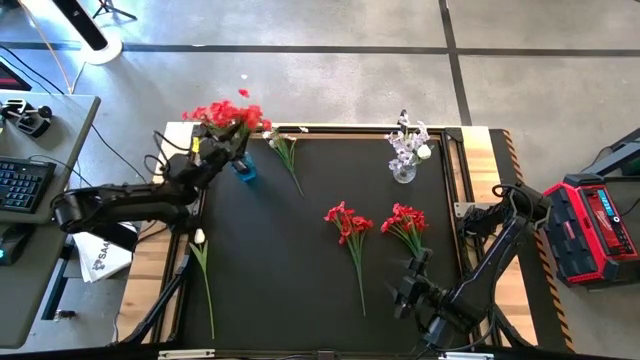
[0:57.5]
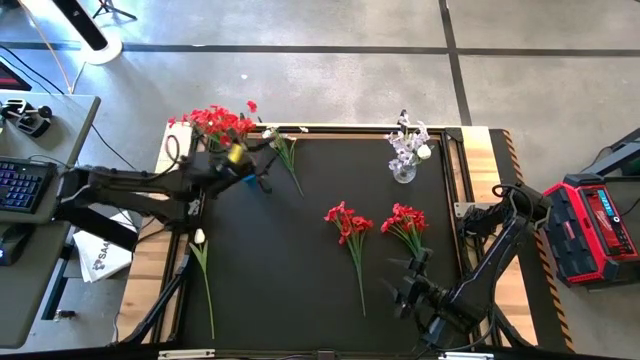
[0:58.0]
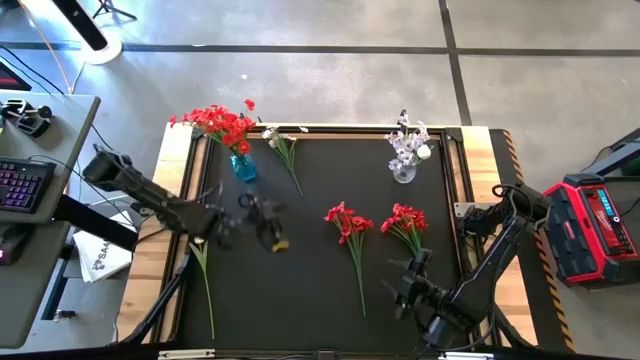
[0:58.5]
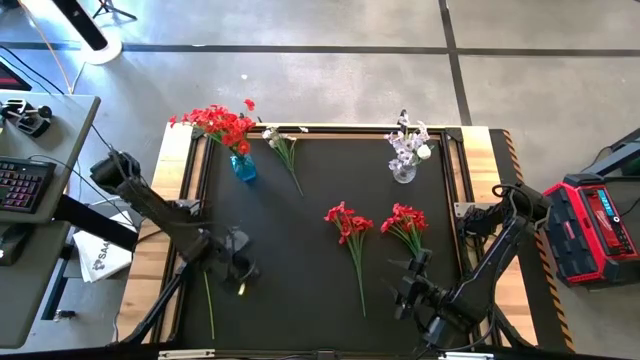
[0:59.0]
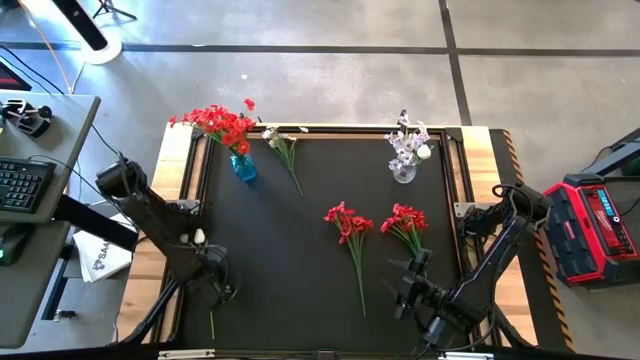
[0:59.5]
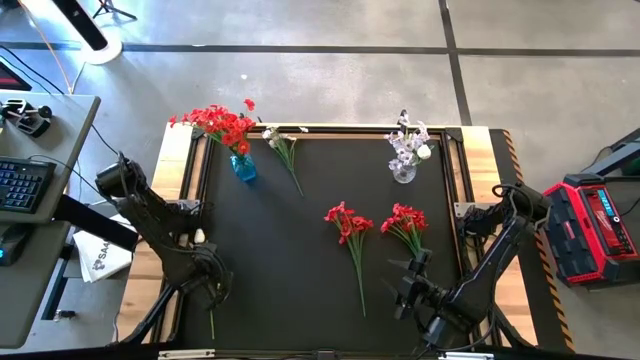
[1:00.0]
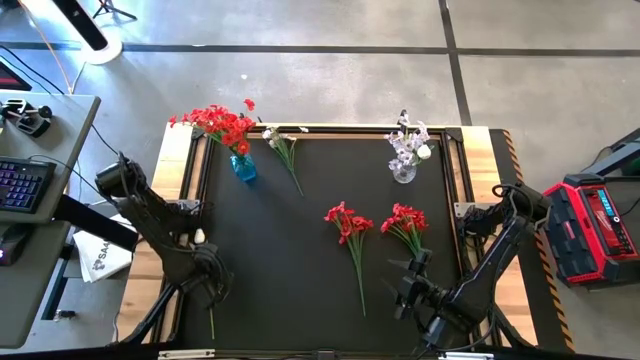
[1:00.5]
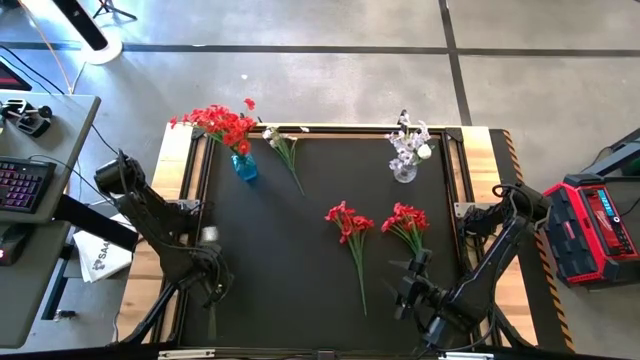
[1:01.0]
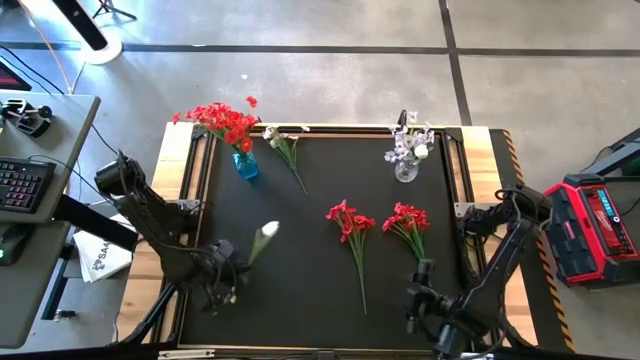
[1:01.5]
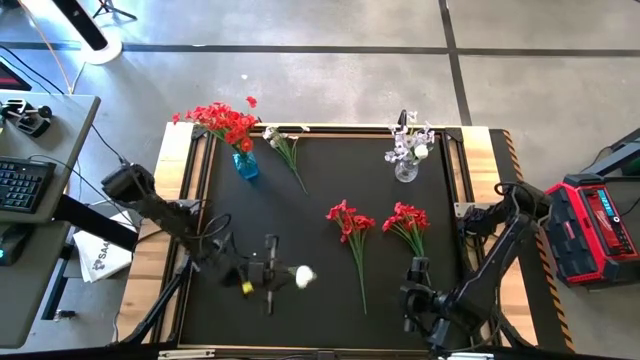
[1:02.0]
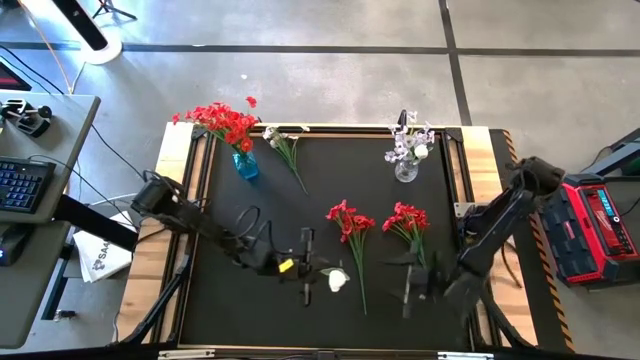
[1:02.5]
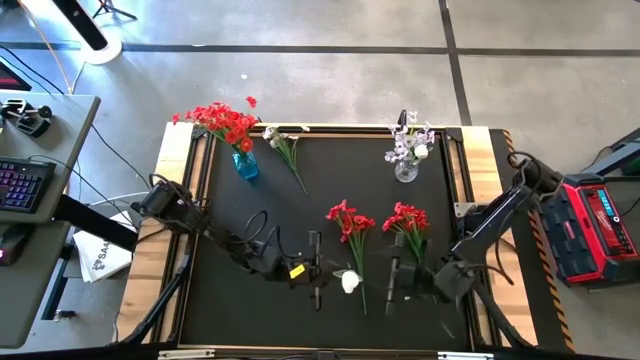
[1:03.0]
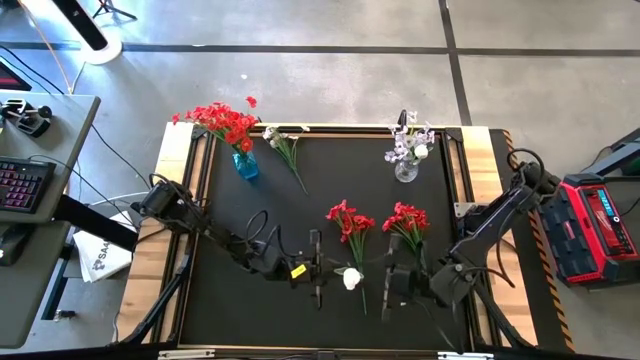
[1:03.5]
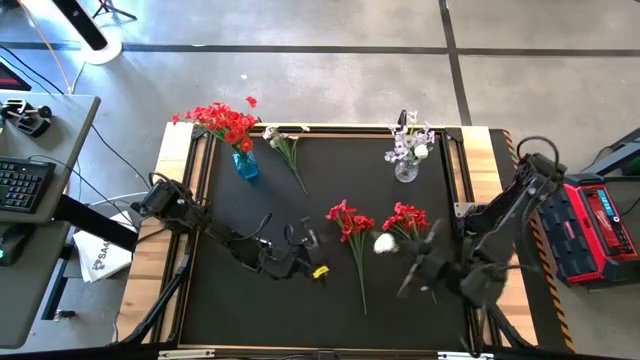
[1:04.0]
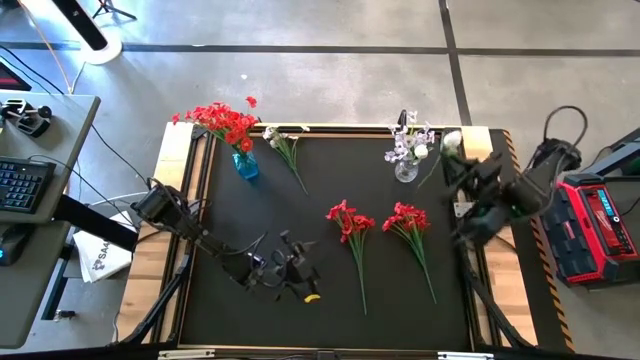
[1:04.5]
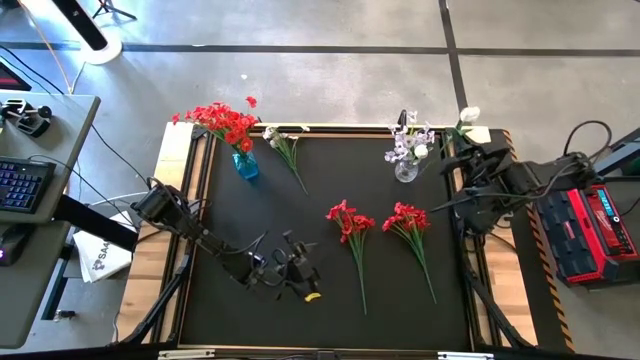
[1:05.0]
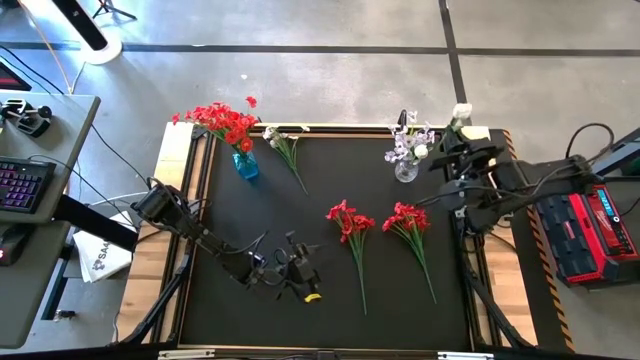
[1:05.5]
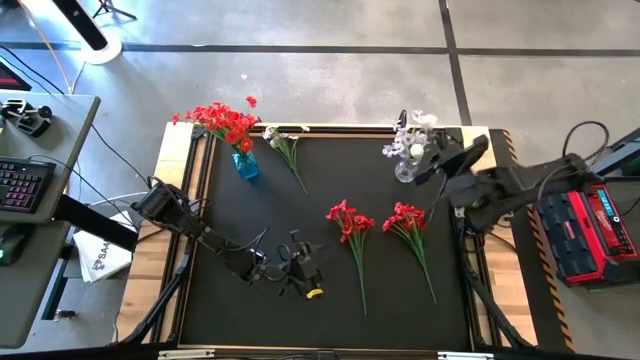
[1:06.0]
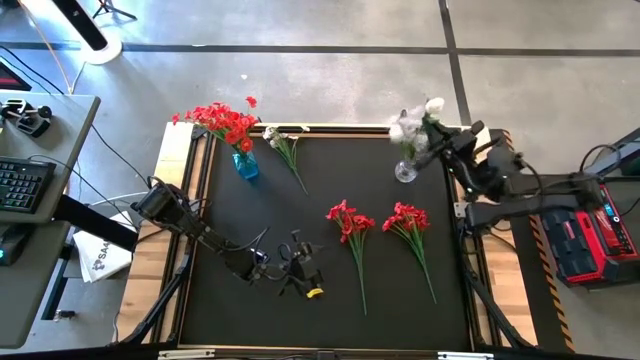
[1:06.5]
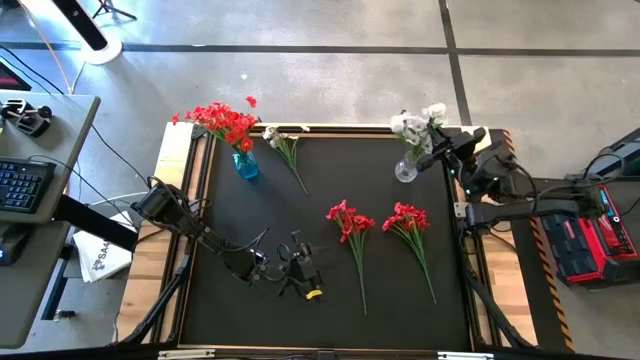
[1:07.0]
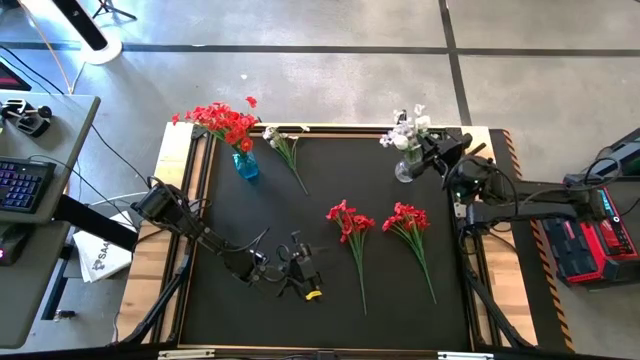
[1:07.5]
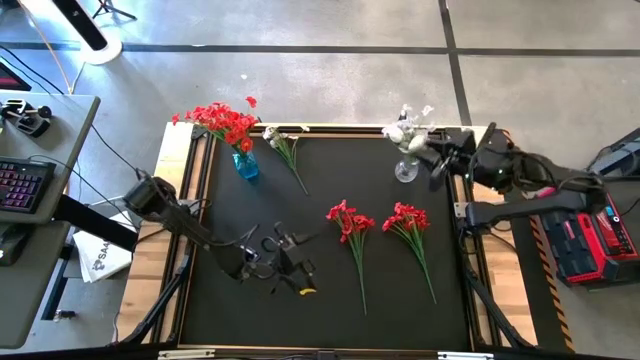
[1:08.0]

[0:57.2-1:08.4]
Task: Sort flowers into vase by color
Put the white flower into the transparent vase

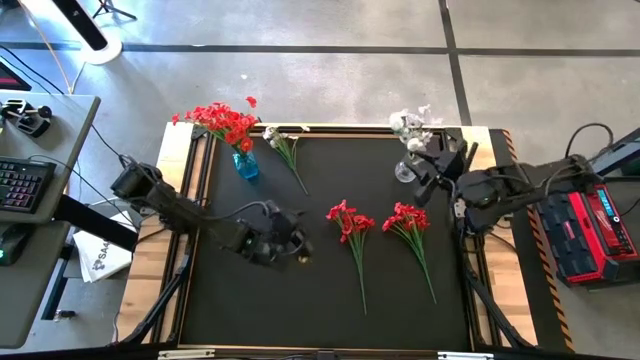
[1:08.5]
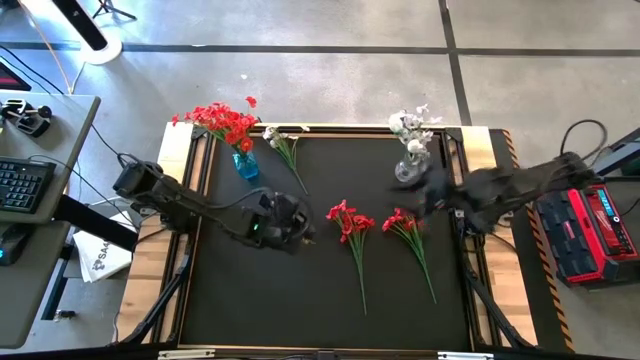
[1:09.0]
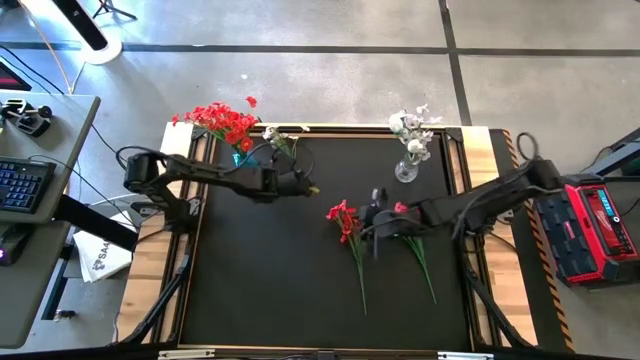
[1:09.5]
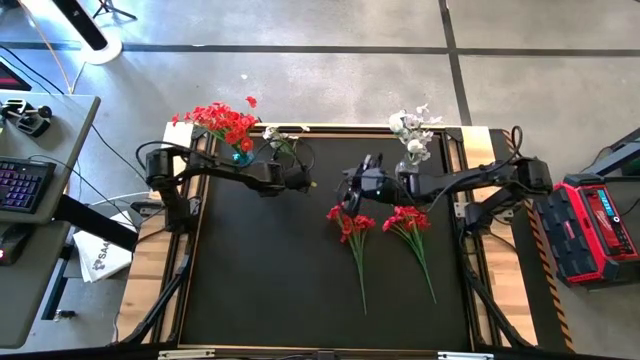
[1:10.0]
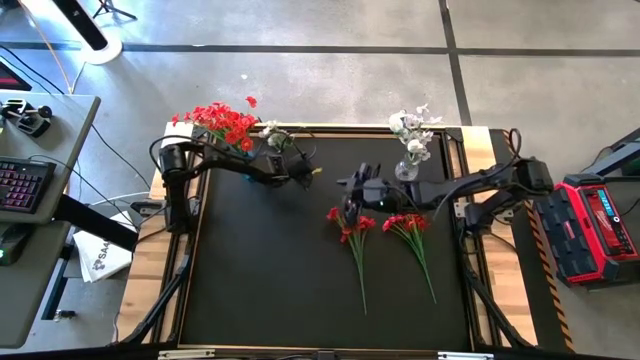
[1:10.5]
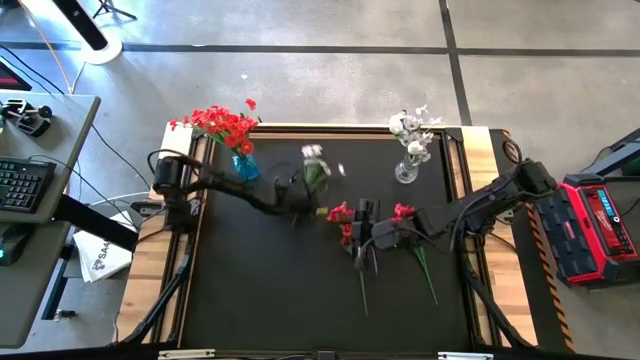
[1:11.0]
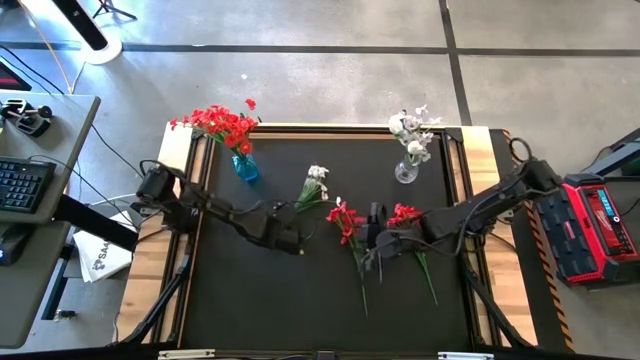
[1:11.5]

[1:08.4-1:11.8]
Move the white flowers to the center of the table

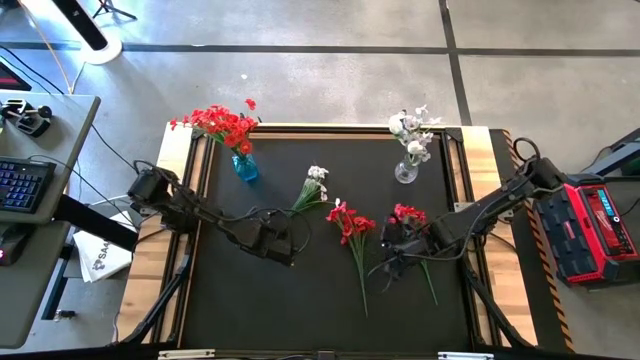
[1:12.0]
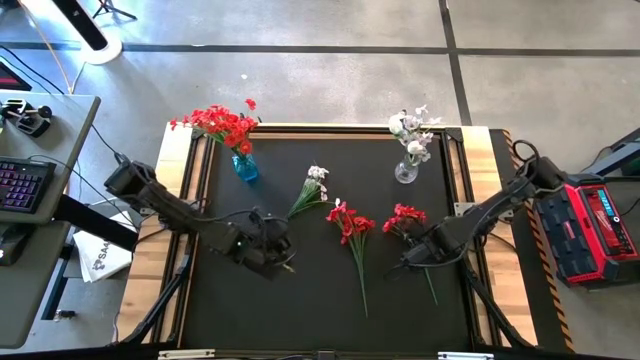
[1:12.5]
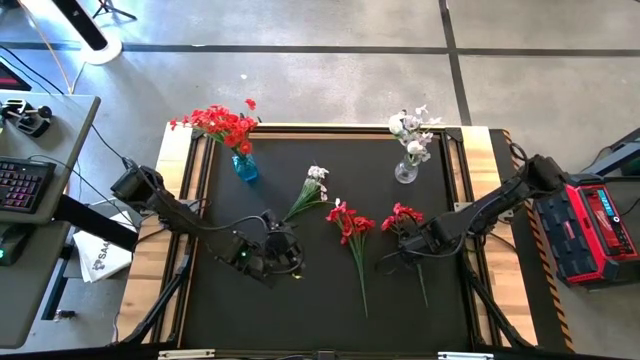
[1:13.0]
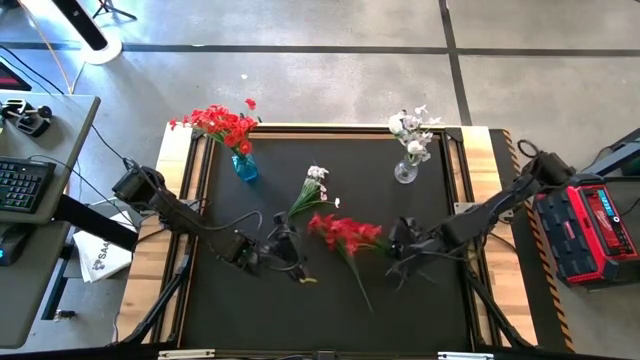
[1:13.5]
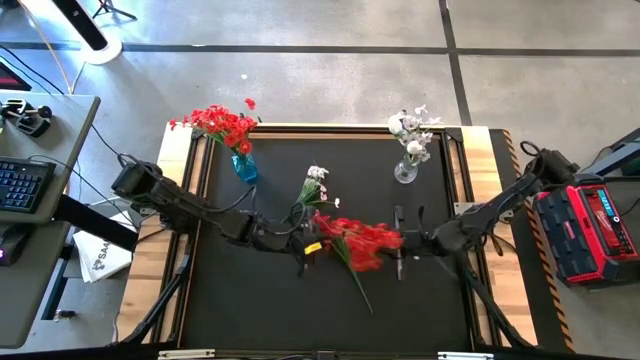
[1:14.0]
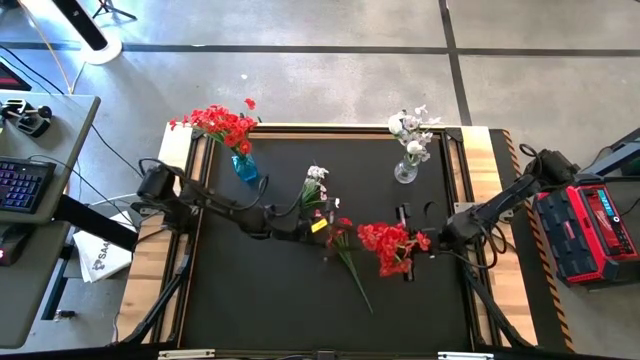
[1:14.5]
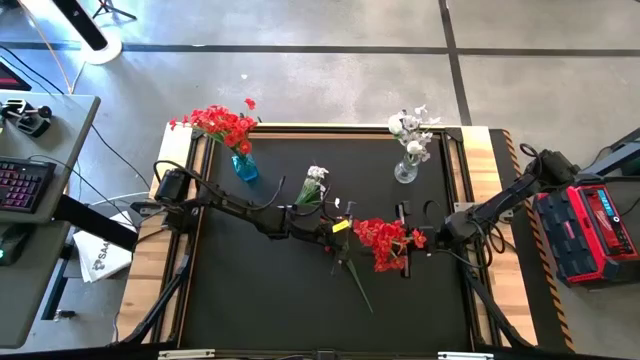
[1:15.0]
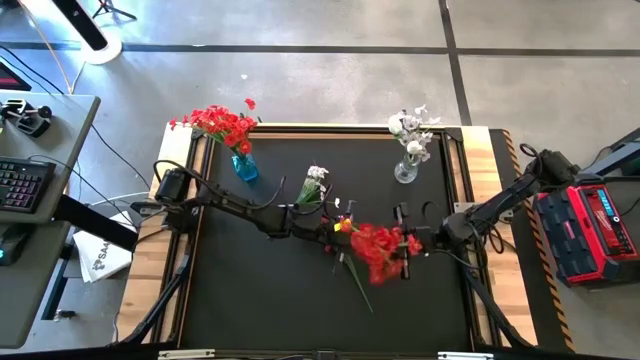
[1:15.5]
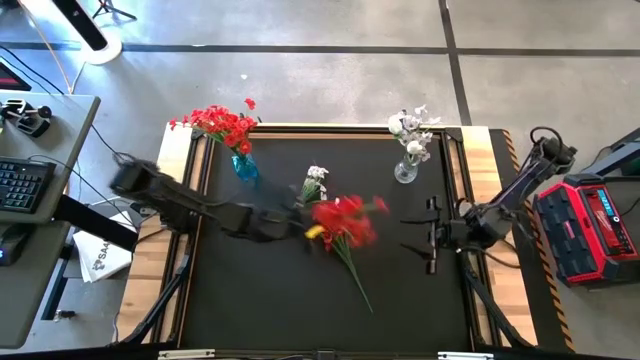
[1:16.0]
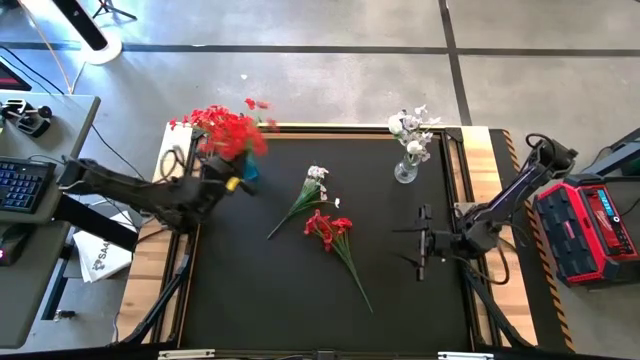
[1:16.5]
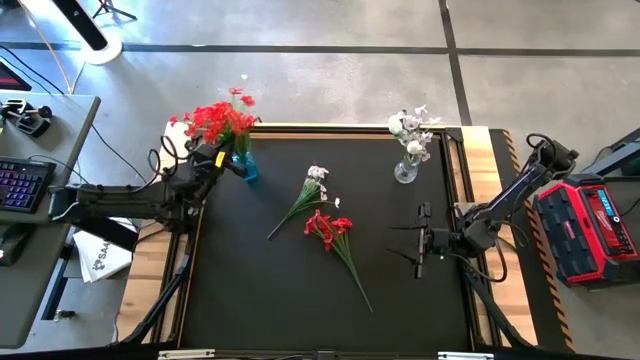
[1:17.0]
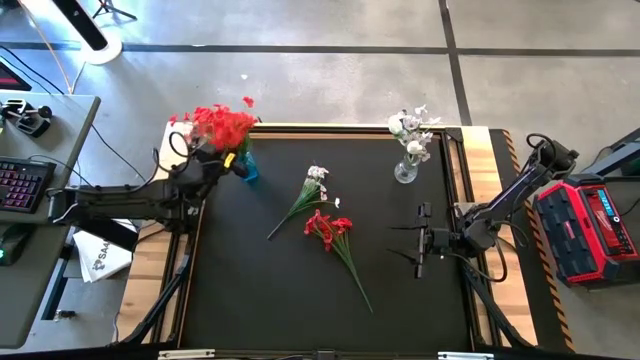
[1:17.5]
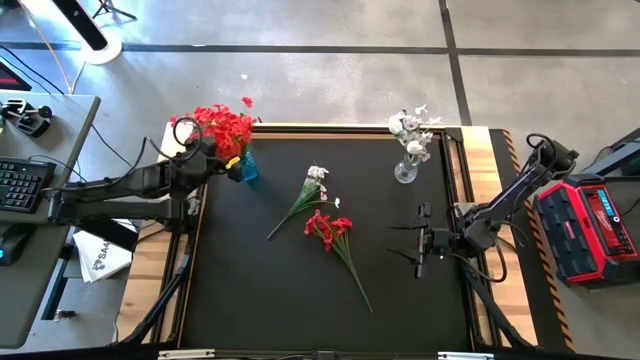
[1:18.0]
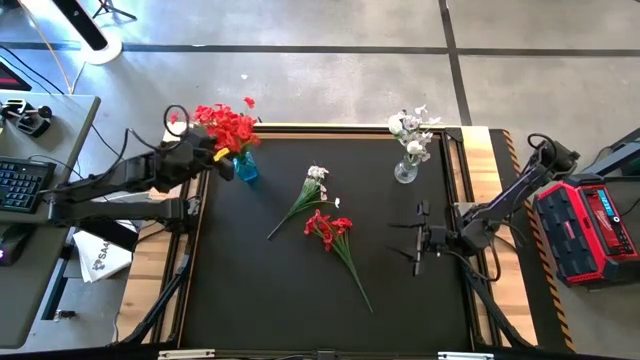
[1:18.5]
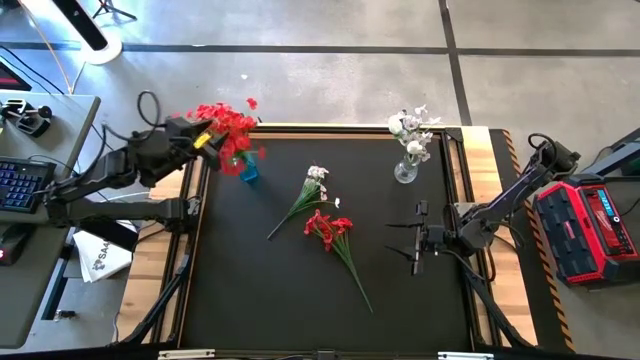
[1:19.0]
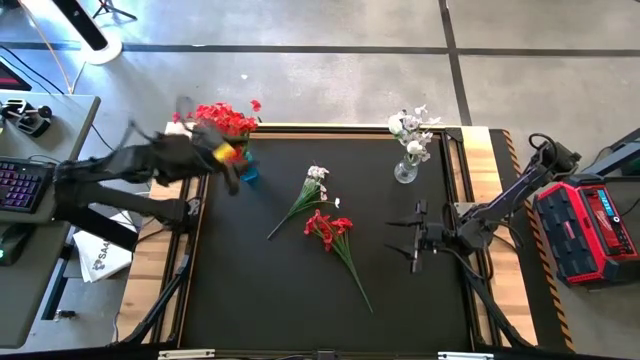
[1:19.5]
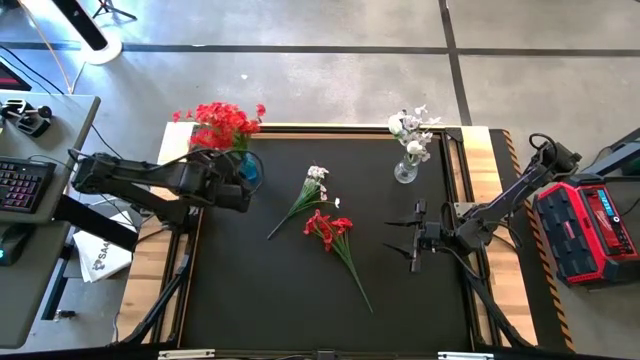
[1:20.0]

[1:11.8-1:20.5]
Put the red flowers into the blue vase
